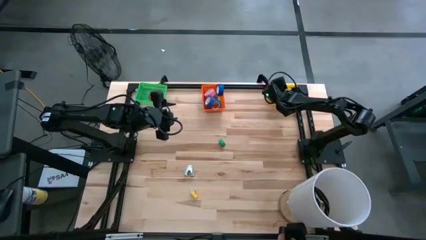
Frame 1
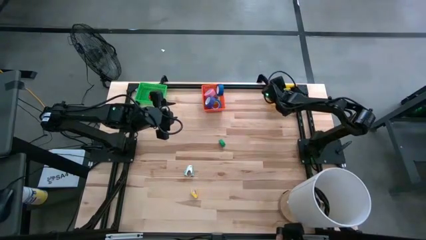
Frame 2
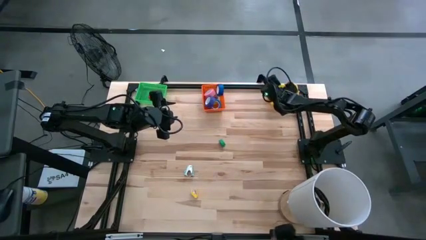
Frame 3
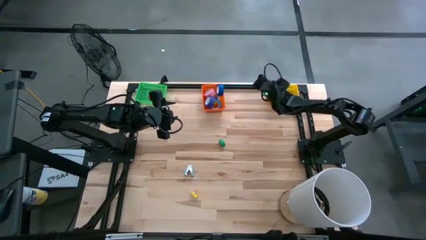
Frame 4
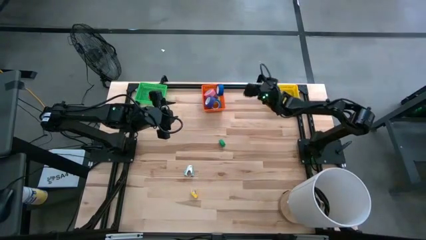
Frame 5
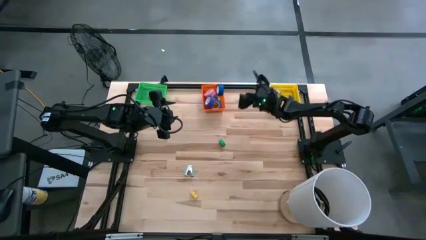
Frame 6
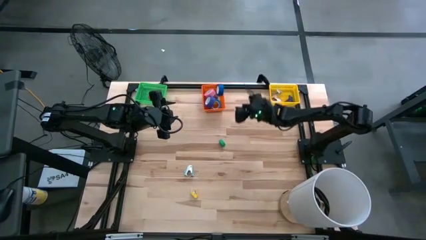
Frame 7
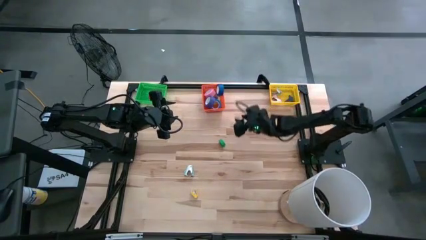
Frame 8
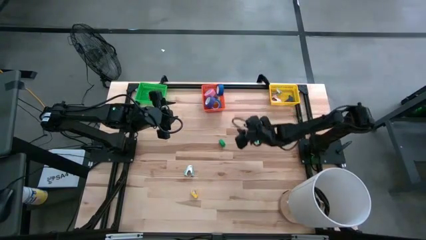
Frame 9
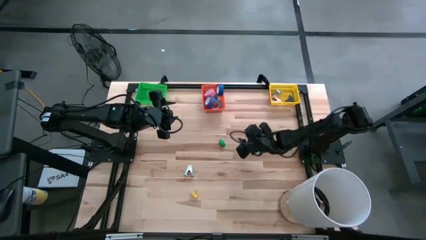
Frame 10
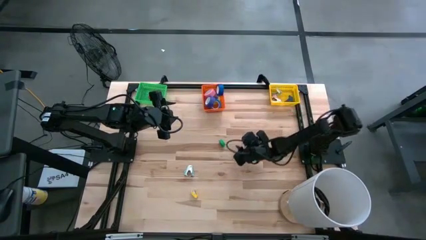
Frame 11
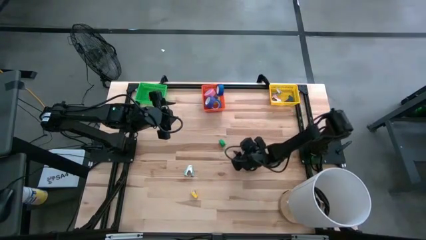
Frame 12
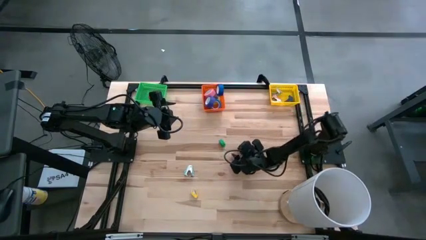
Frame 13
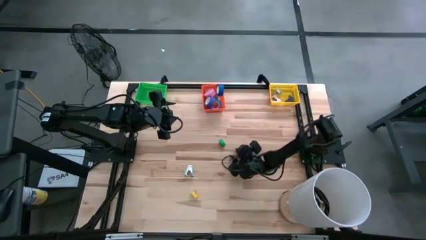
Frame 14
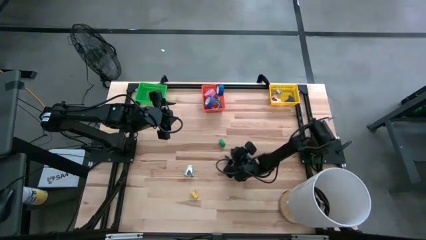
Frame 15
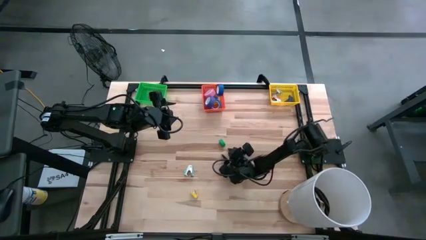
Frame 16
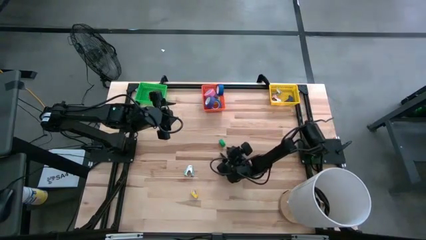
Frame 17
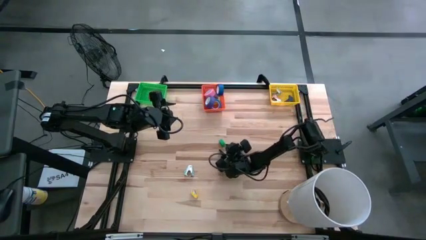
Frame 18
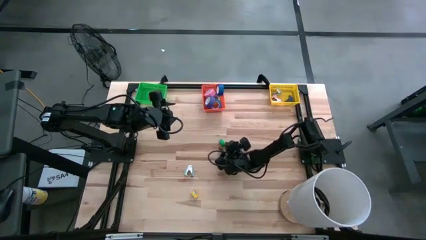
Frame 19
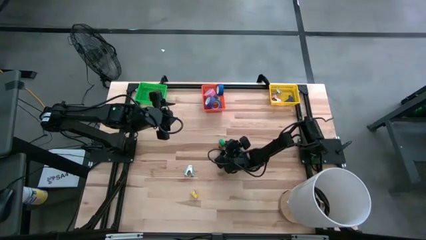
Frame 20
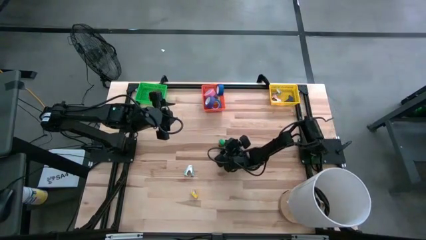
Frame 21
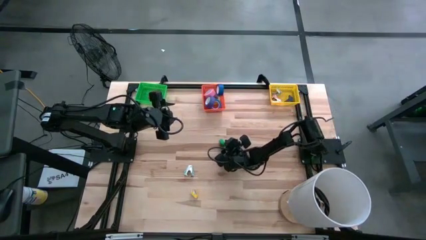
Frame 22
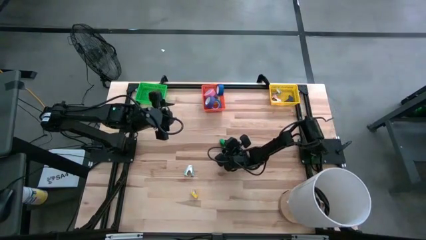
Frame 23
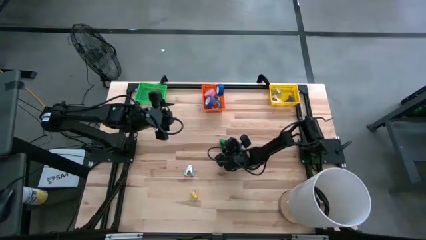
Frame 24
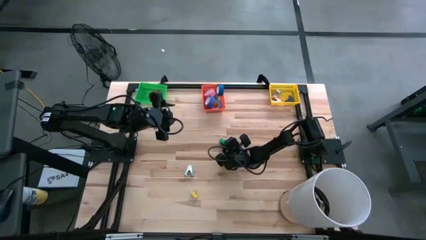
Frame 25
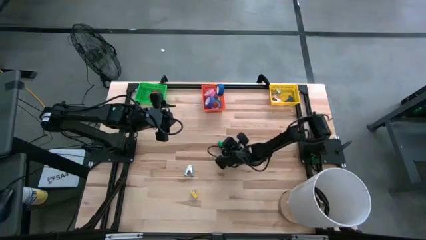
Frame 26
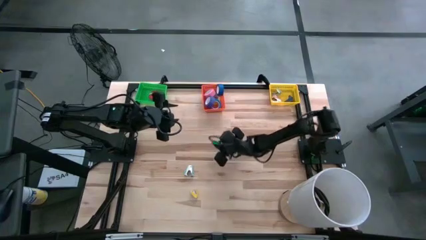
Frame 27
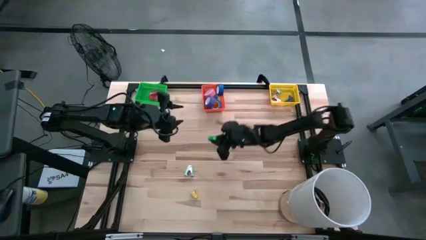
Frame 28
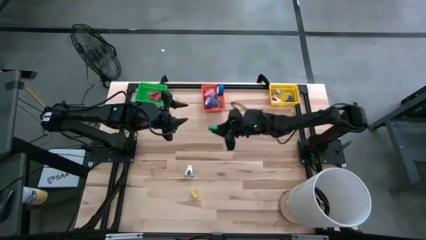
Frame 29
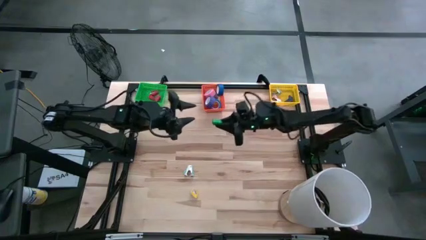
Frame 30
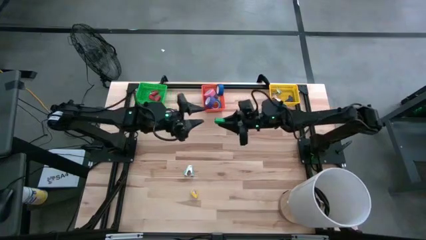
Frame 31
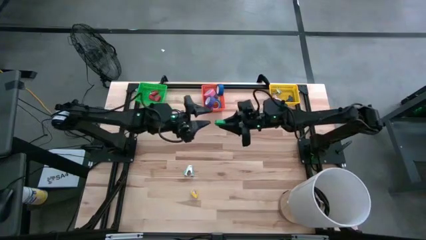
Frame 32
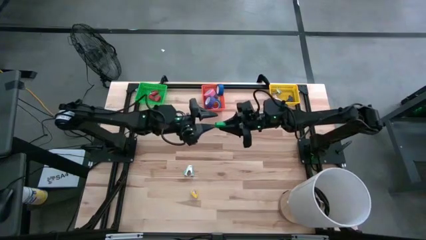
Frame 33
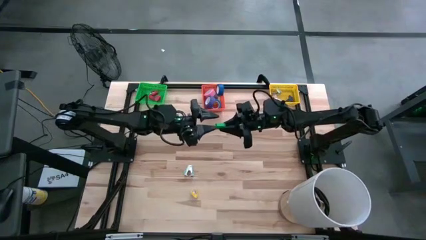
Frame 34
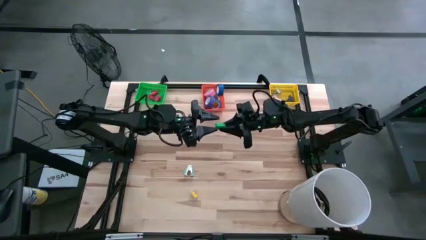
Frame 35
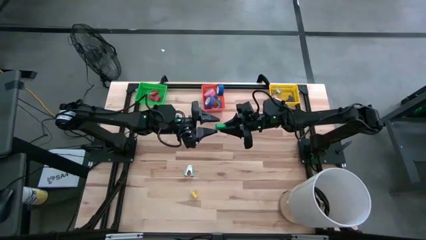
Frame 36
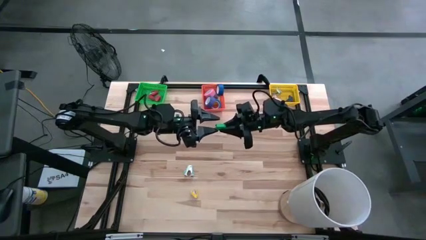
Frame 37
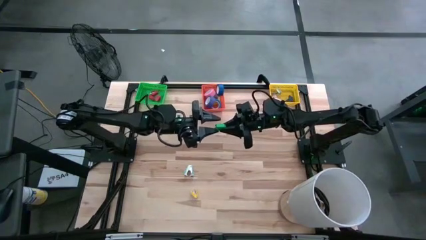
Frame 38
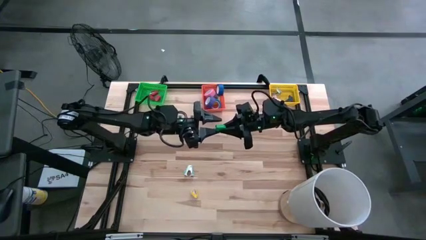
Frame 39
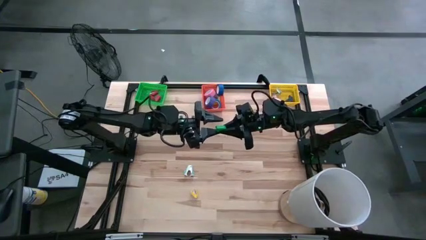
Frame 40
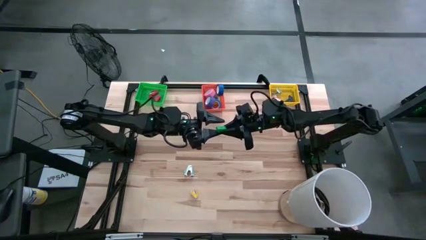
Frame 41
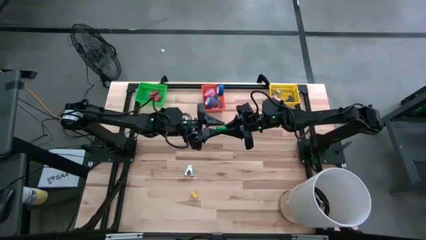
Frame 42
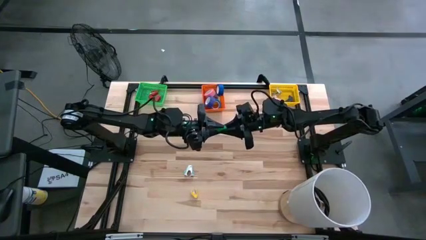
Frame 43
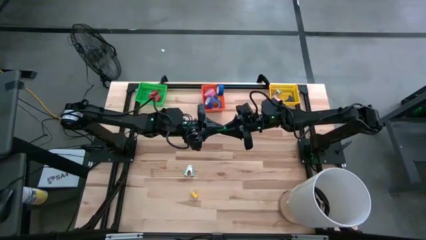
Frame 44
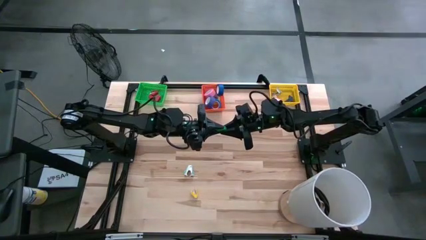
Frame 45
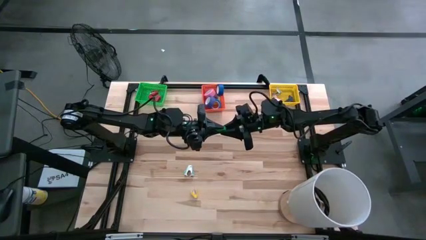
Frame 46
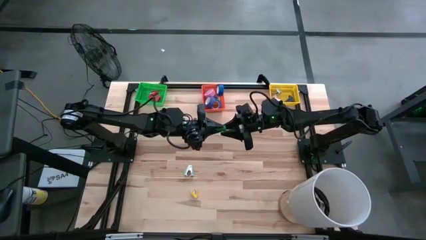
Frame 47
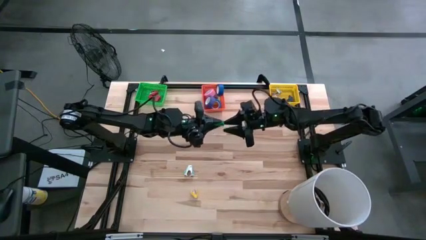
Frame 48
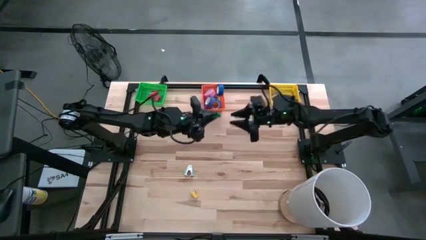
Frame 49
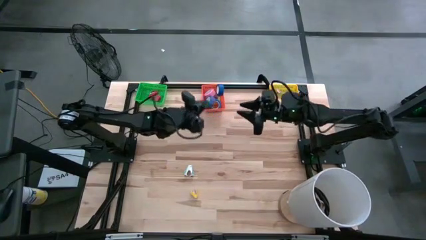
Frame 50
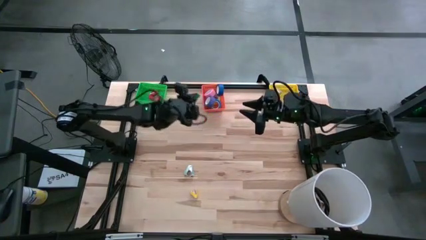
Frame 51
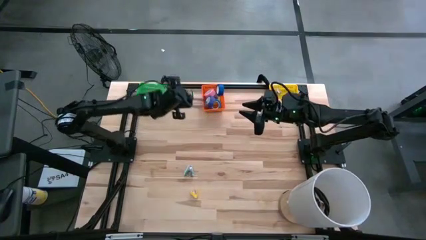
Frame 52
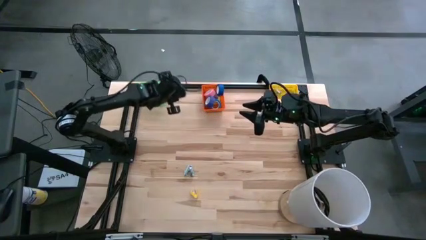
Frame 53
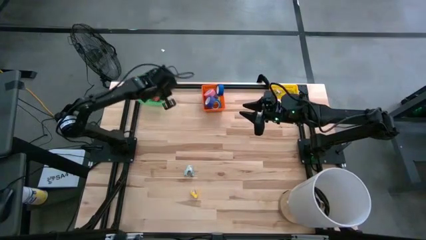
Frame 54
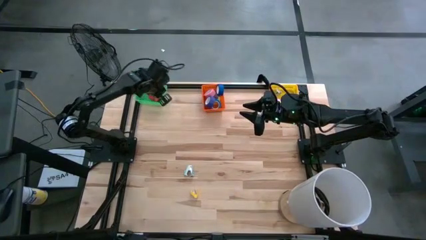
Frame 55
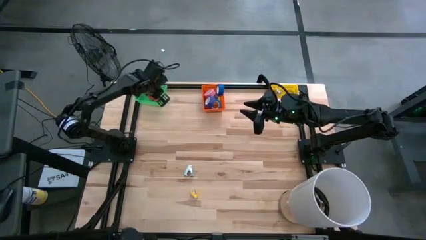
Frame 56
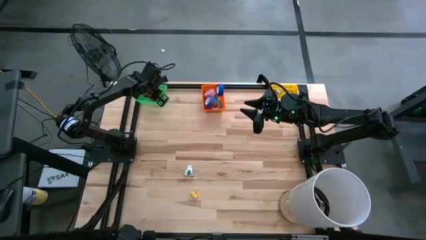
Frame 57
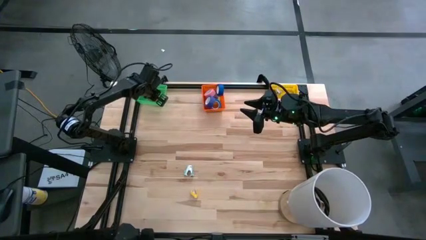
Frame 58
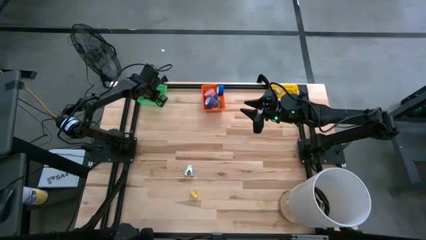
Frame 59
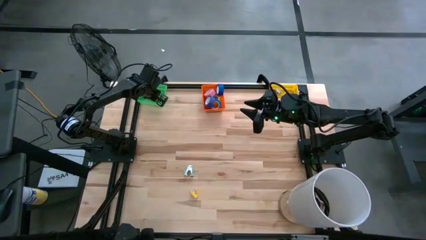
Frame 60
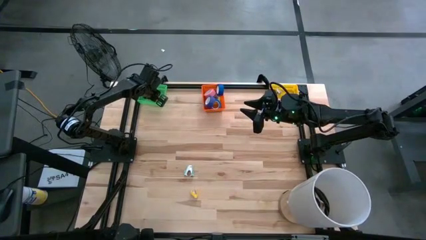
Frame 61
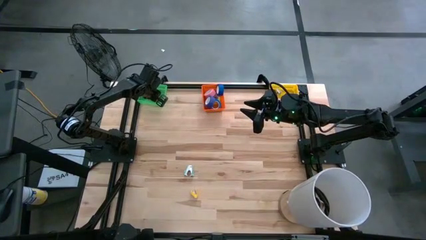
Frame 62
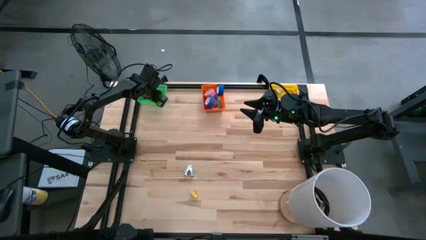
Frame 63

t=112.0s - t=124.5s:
Task: Pick and place Stapler, Stapler remover, tape
Put the green stapler into the green bin
